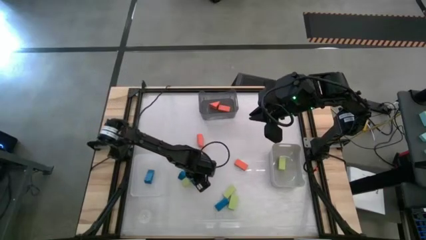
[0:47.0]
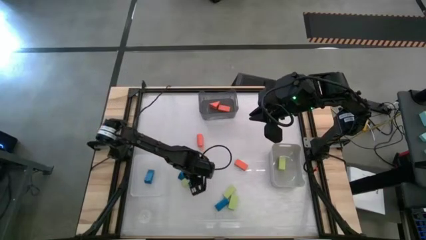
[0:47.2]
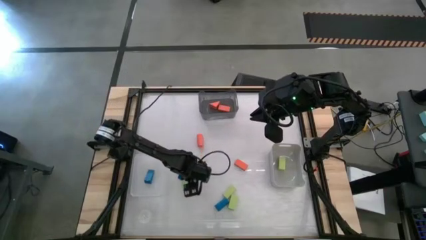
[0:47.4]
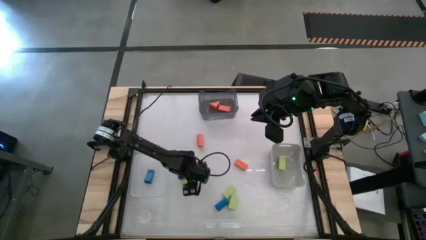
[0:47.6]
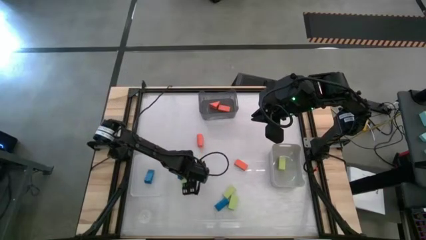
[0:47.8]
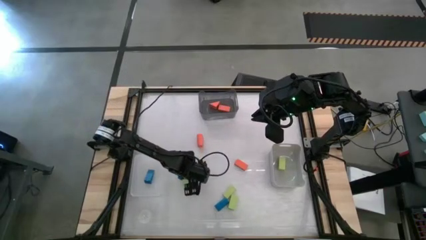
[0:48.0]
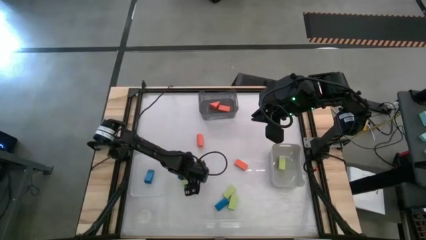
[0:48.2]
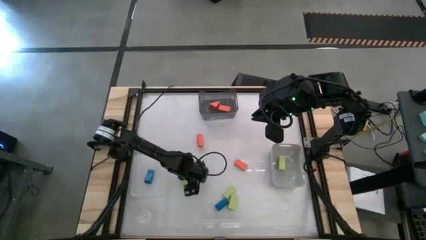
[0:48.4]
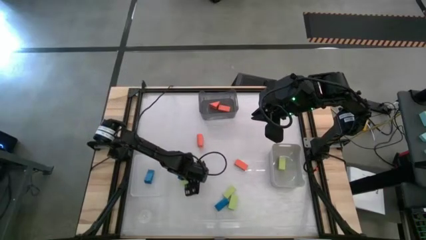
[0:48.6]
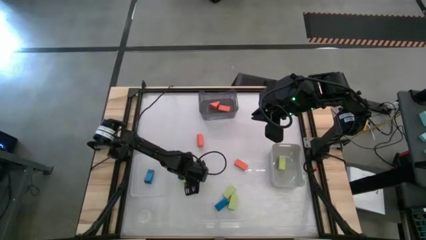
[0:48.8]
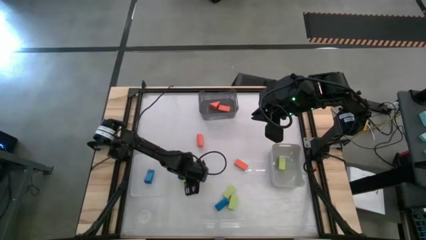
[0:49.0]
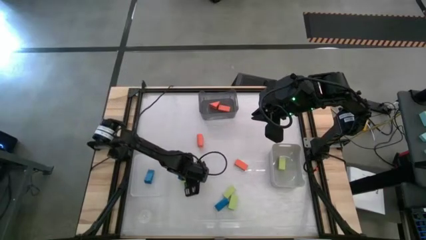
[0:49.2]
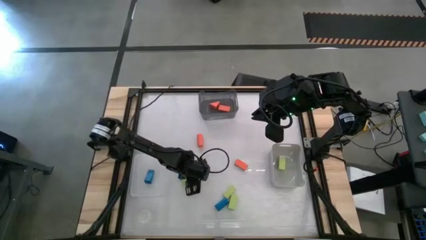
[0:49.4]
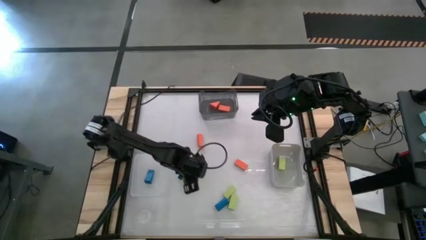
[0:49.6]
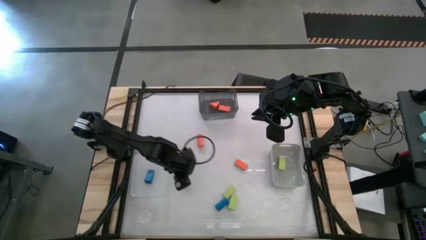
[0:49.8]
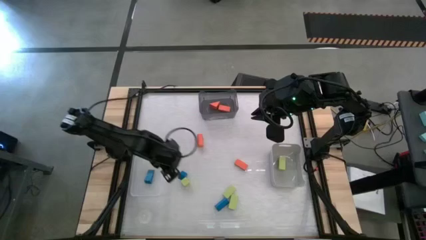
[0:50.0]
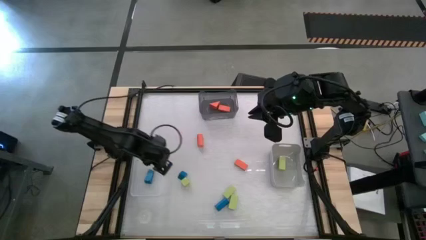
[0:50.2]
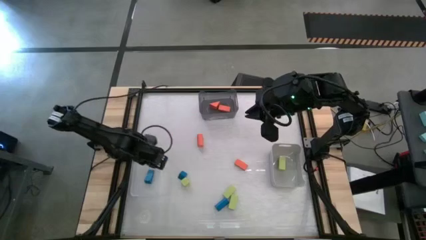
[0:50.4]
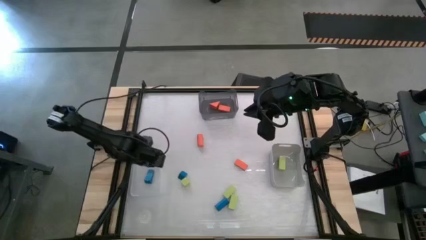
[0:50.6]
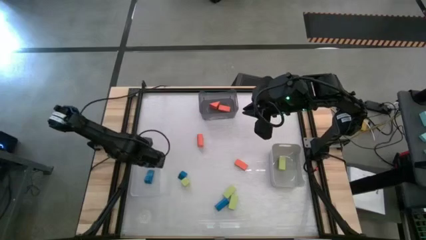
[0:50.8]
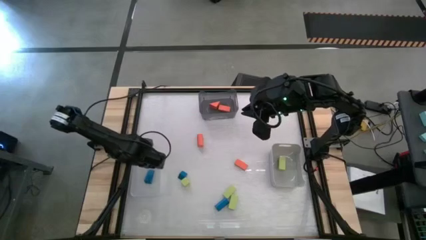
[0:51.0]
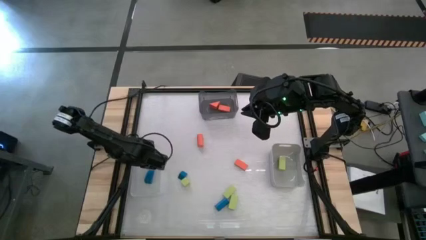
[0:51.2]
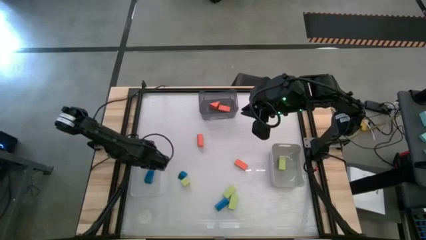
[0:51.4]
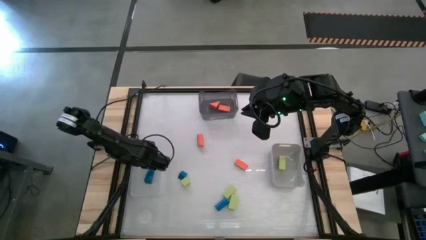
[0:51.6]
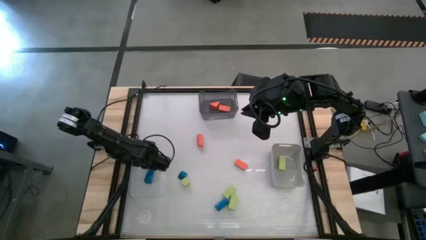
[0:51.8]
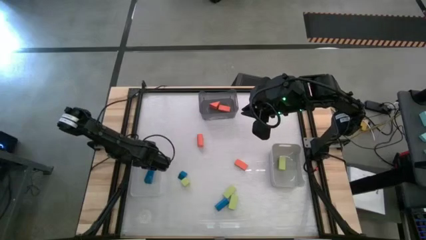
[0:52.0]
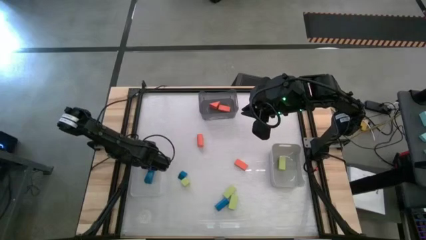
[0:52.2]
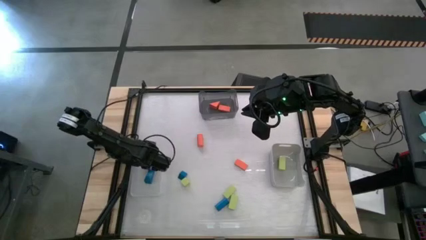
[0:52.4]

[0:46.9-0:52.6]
Task: Sort & place blocks by color
Put the blue block into the white bin

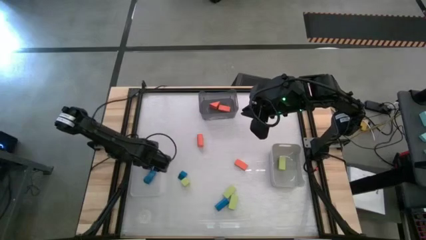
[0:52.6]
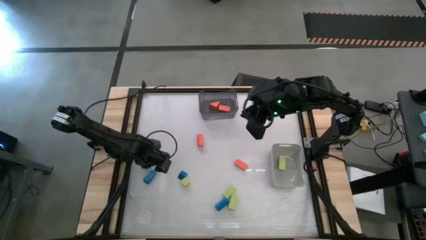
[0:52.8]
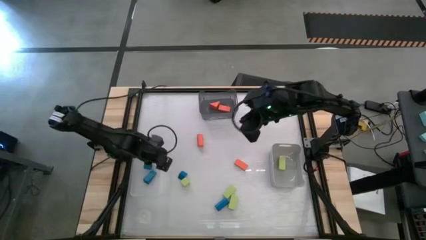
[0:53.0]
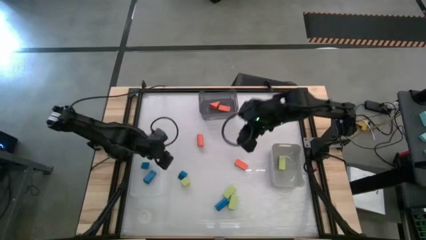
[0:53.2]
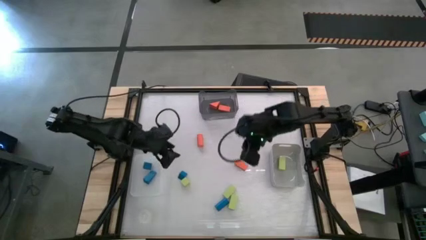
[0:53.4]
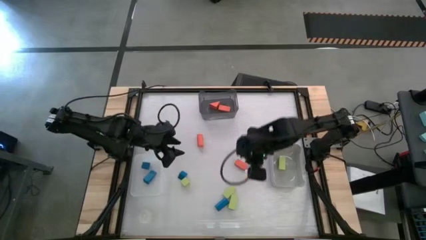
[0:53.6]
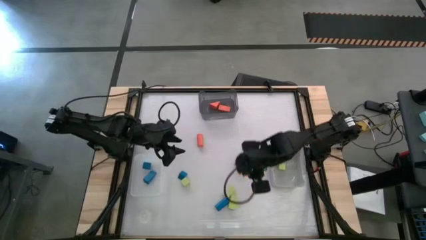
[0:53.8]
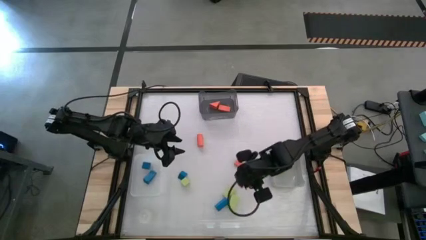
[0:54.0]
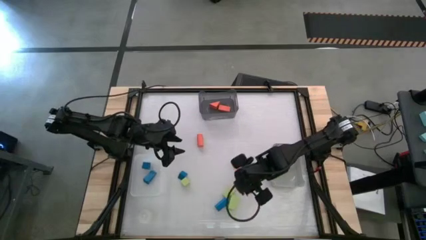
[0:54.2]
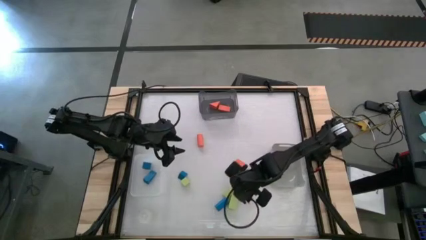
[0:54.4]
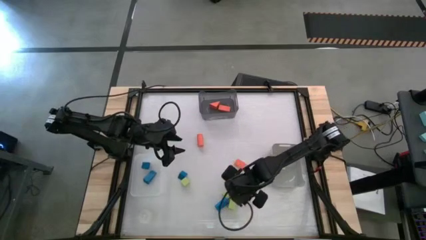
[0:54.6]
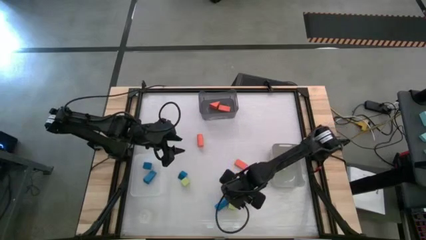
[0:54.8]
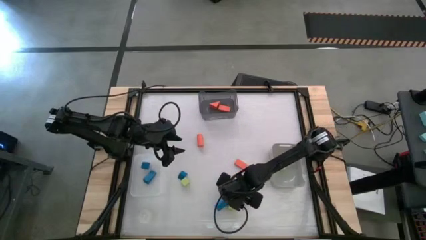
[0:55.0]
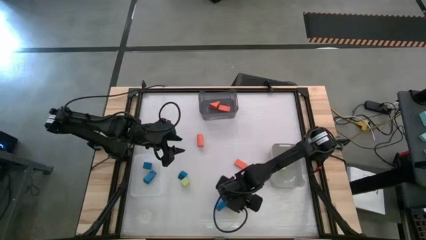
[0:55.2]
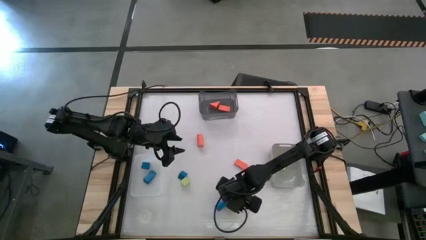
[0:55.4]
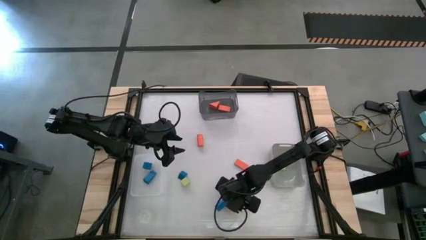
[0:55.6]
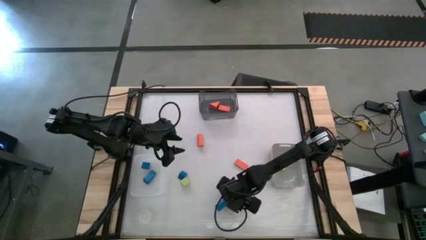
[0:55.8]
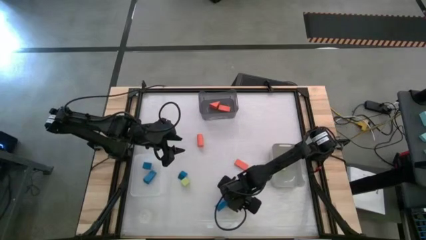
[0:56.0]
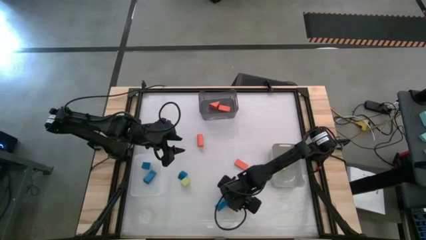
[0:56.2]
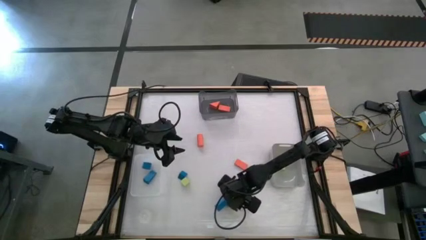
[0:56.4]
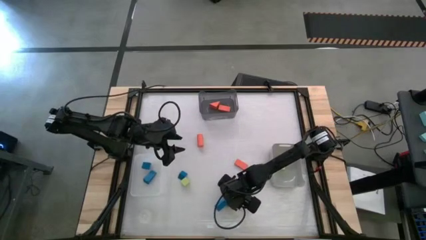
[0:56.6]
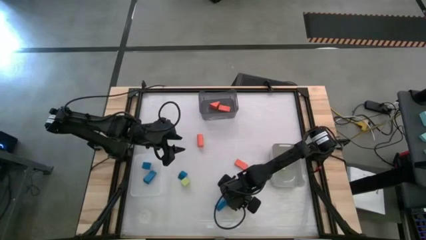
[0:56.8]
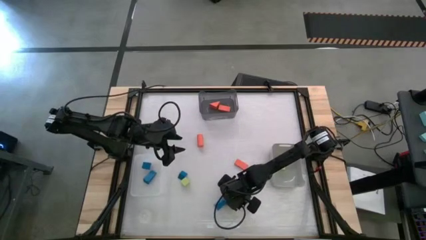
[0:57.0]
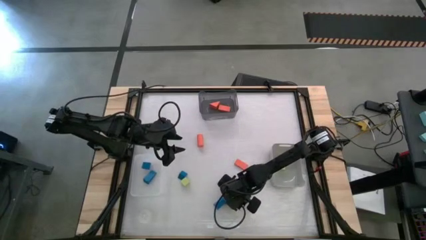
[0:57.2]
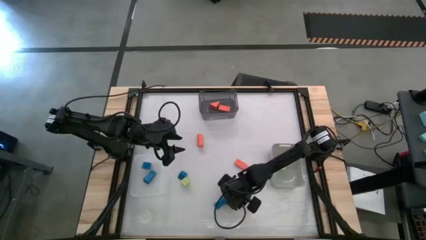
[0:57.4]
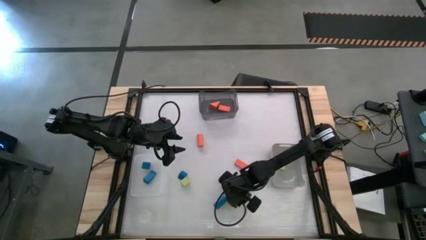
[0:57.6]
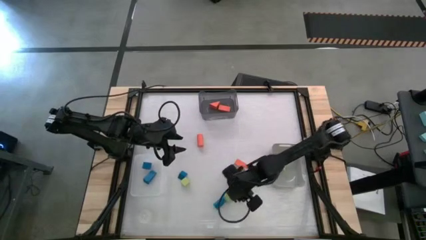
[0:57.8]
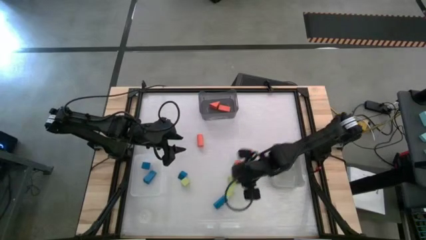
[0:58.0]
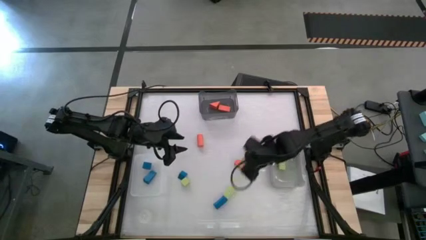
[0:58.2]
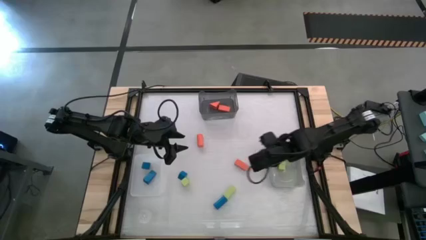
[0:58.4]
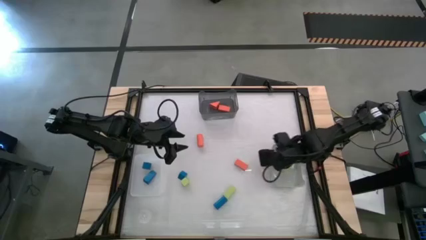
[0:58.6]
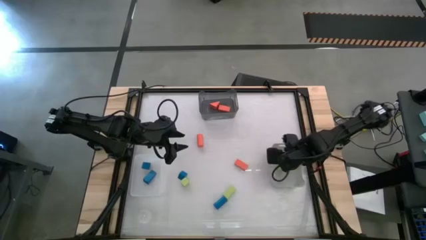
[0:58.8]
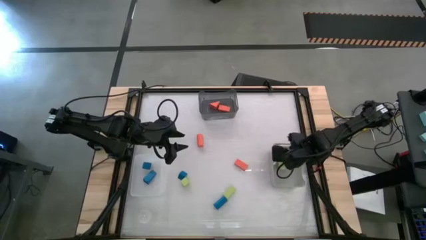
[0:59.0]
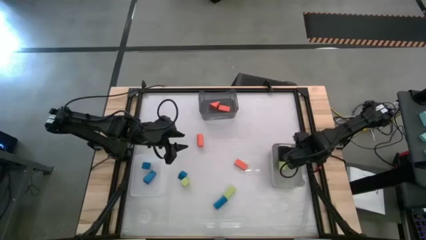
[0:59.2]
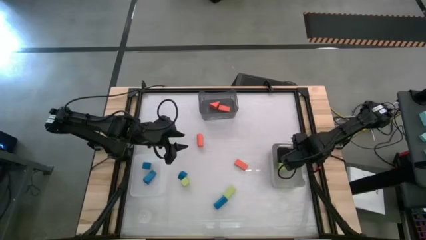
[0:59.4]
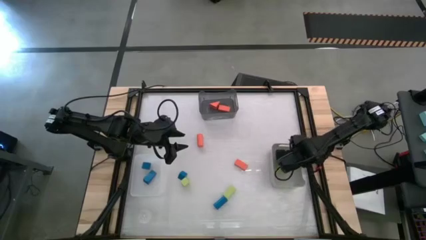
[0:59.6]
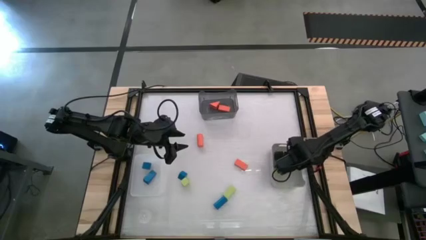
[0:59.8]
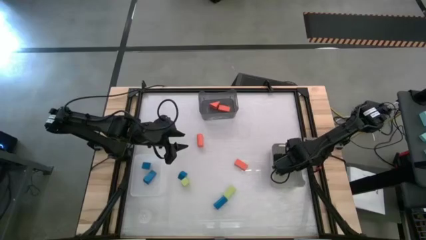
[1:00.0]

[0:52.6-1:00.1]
Put the green block into the gray bin

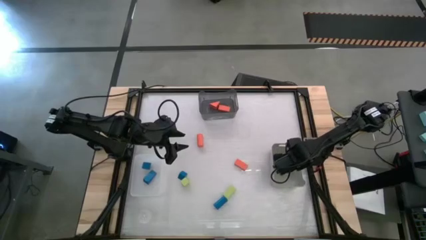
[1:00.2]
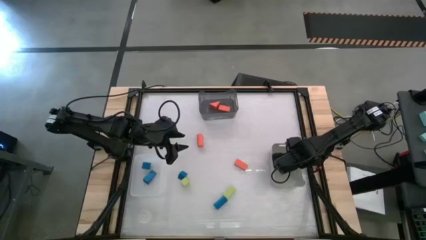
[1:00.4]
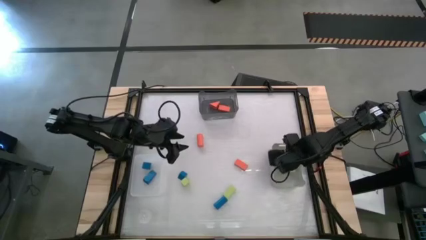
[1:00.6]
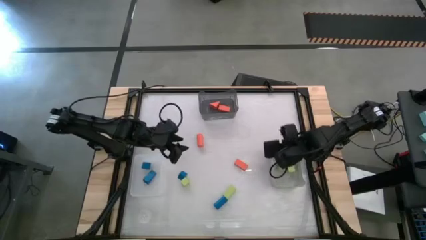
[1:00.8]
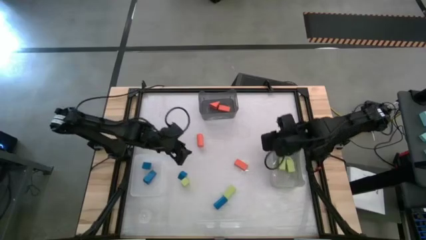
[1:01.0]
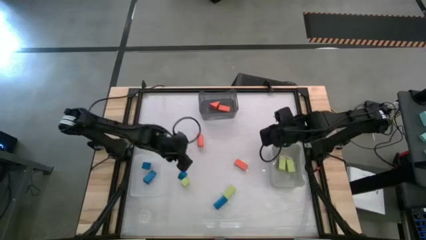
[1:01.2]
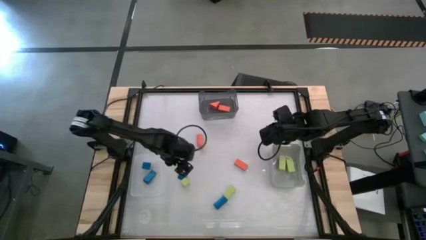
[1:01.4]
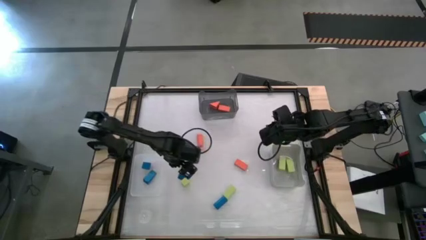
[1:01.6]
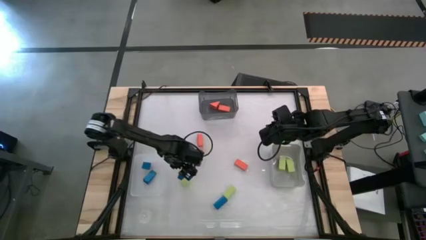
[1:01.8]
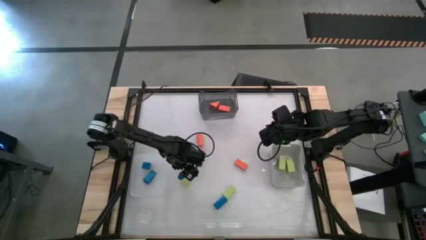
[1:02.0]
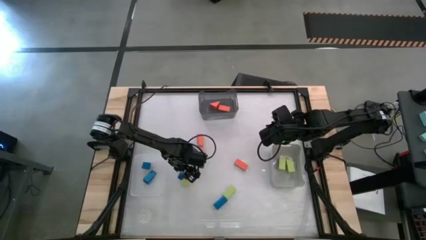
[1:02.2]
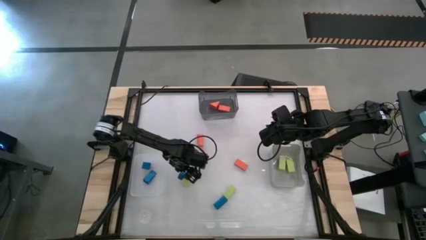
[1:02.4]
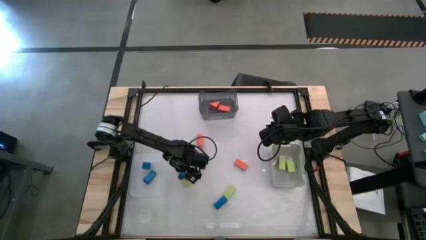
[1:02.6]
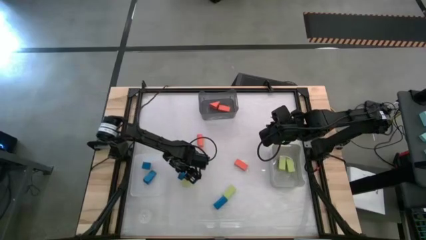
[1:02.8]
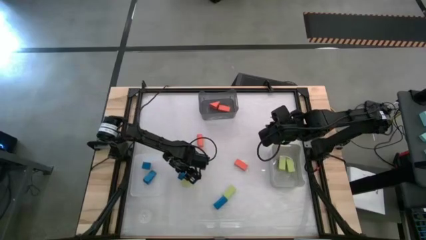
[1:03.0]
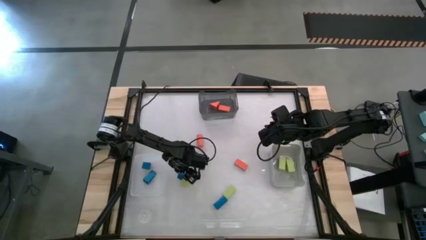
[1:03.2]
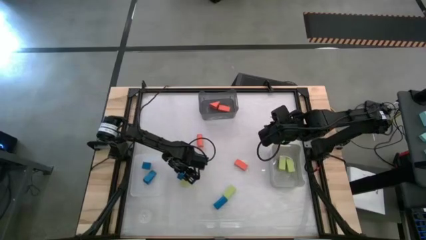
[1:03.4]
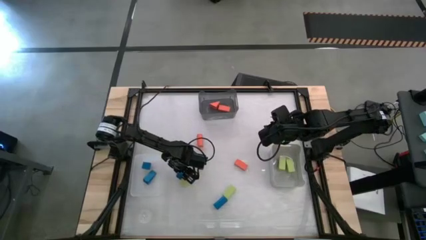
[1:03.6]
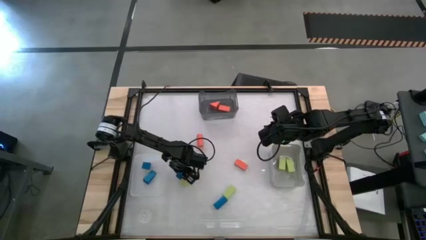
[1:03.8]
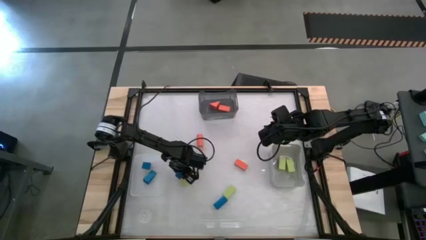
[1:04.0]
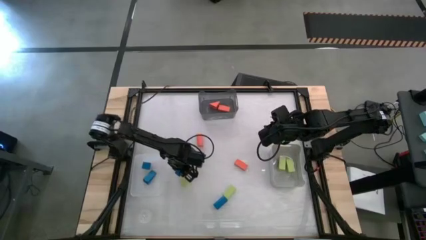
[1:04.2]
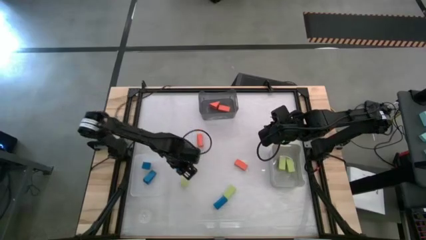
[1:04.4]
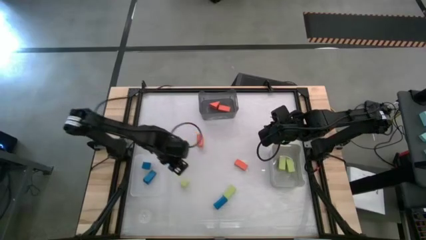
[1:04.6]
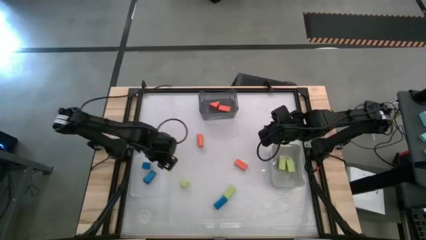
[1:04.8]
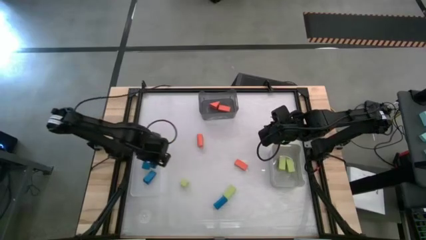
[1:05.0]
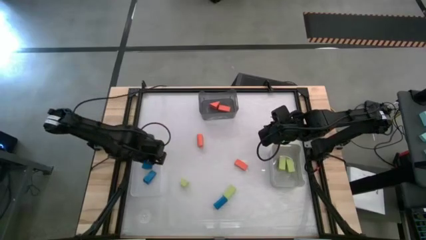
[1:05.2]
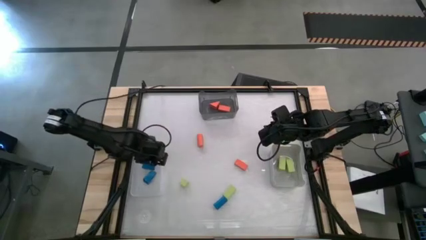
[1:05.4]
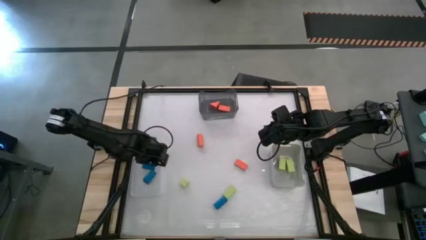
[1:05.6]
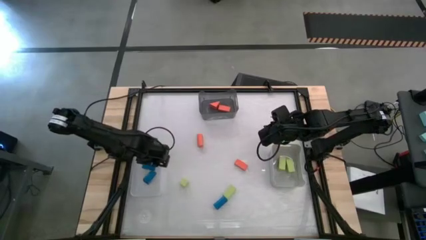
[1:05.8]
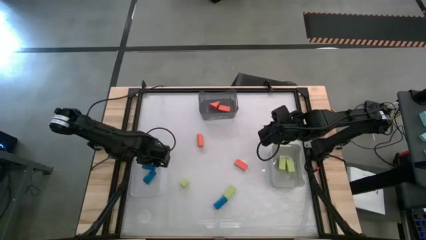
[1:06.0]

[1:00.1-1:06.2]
Put the blue block into the white bin
